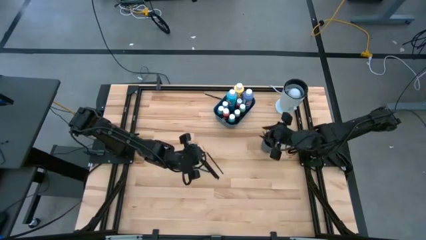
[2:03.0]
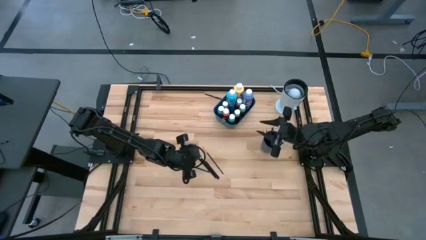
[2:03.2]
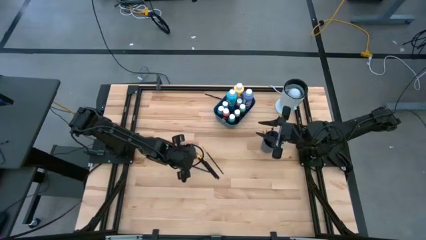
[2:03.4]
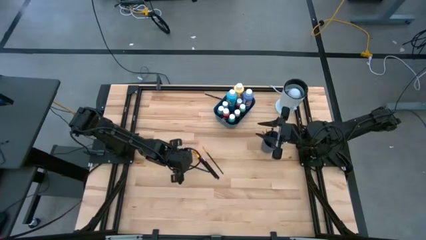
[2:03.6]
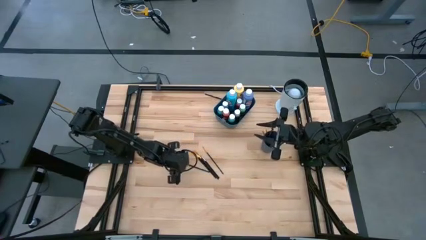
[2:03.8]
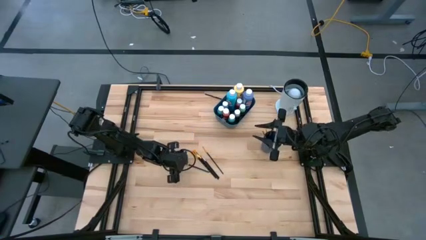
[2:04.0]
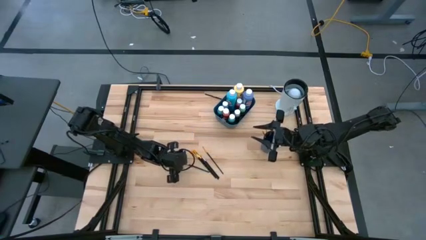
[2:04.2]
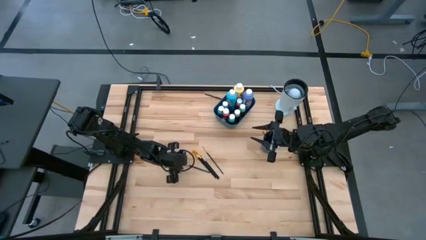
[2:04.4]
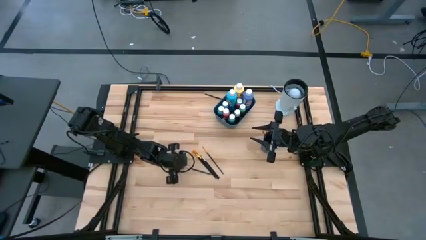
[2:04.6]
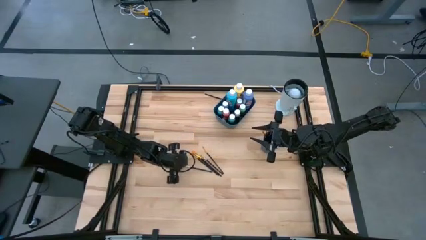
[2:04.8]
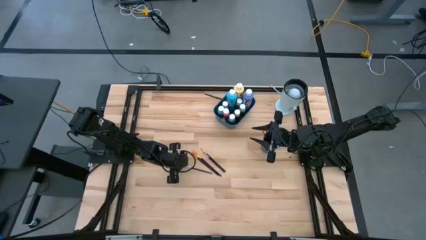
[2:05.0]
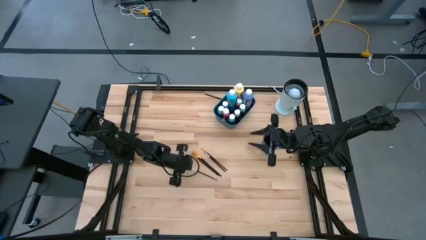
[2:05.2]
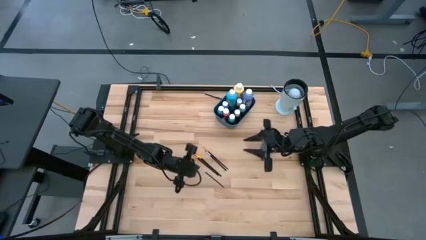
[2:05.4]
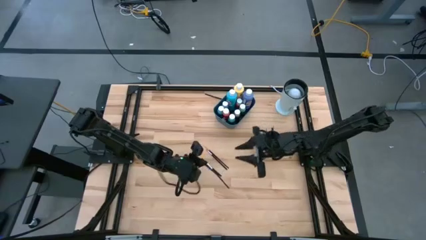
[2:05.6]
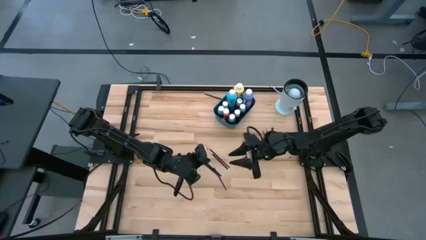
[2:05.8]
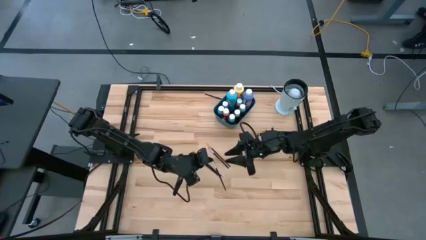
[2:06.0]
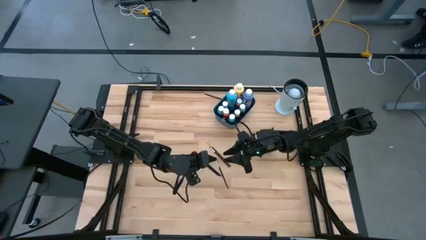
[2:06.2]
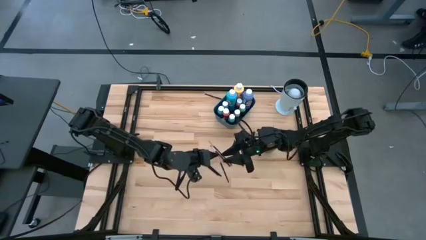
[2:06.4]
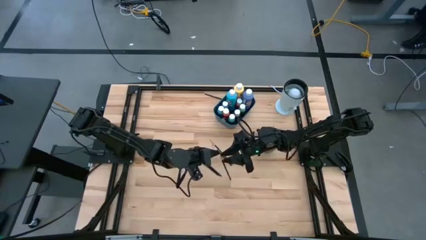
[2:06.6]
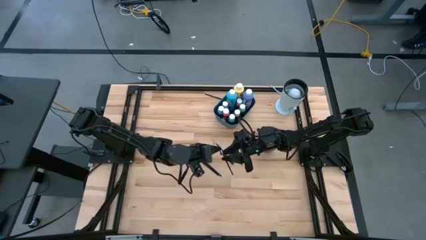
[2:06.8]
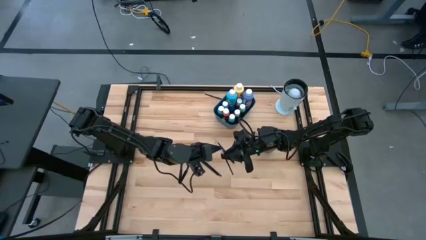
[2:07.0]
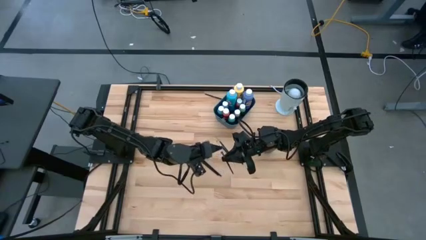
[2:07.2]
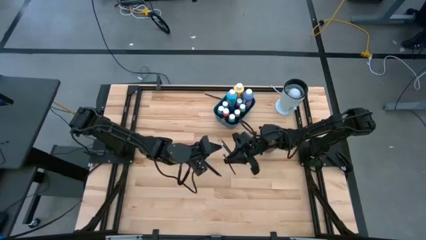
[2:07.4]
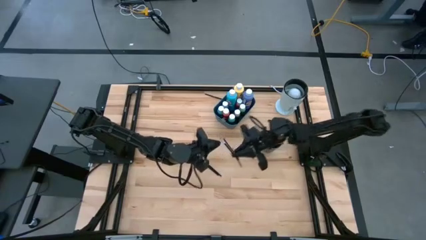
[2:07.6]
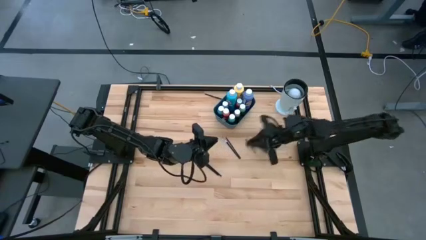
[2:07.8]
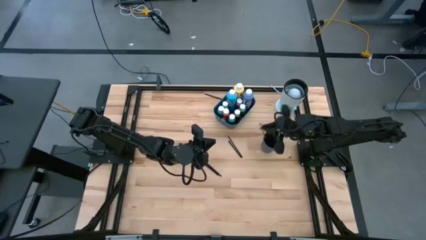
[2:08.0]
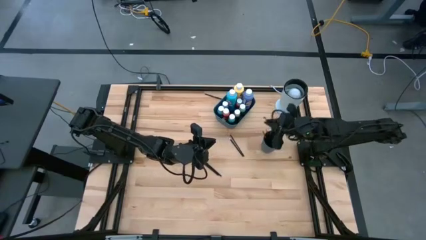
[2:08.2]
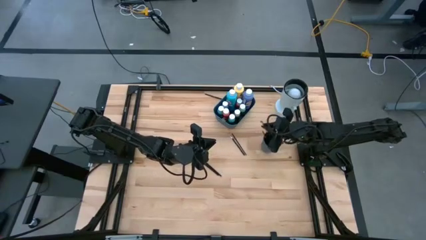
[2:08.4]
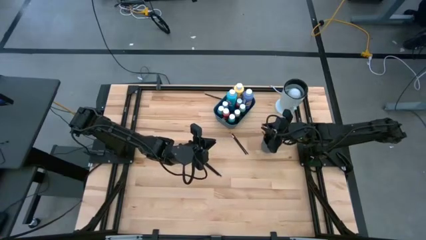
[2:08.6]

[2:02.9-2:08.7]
Task: Pick & Place Paint Supplies
Put the silver paint brush into the blue cup

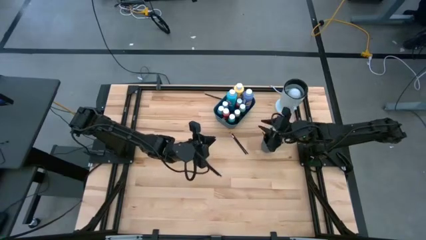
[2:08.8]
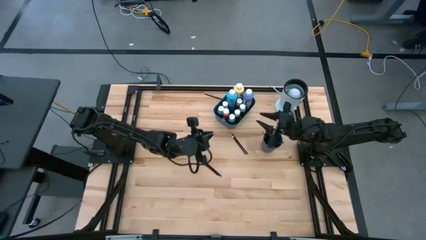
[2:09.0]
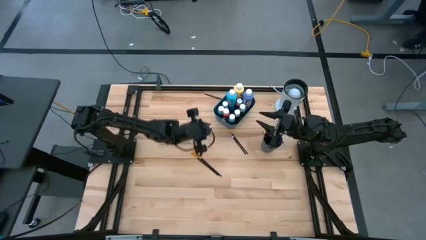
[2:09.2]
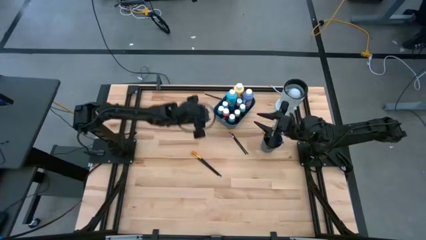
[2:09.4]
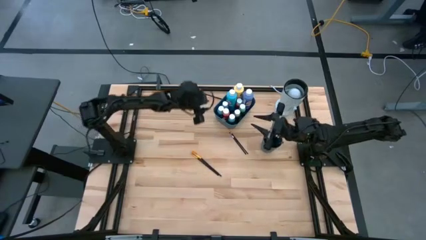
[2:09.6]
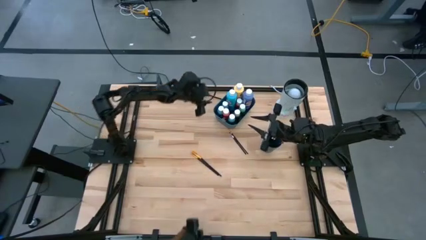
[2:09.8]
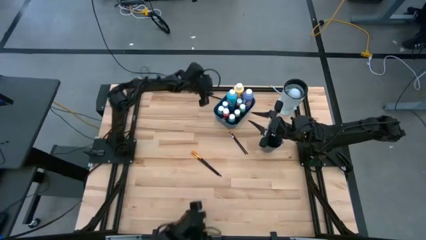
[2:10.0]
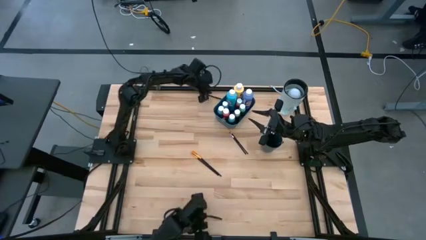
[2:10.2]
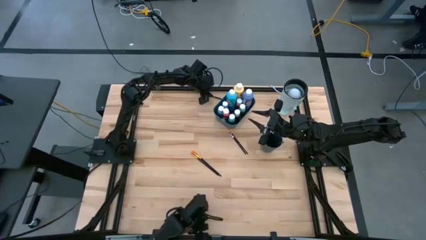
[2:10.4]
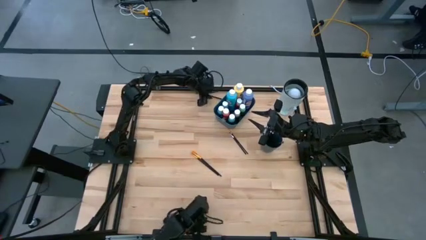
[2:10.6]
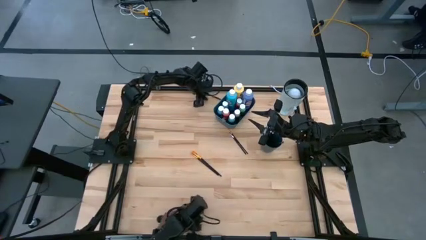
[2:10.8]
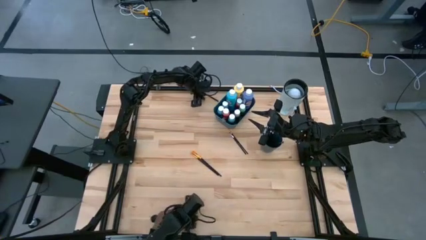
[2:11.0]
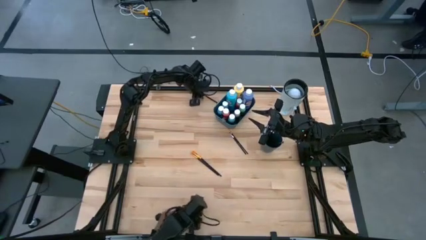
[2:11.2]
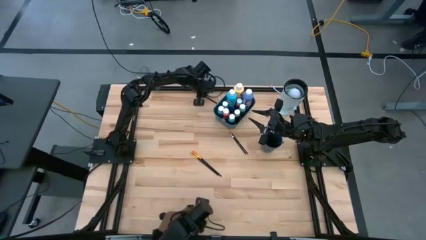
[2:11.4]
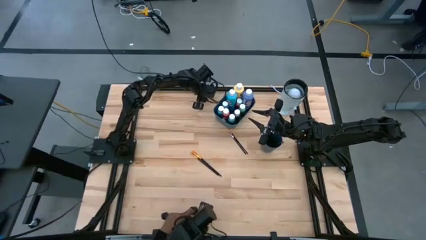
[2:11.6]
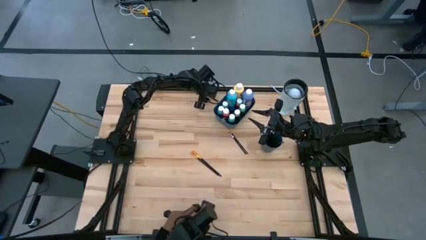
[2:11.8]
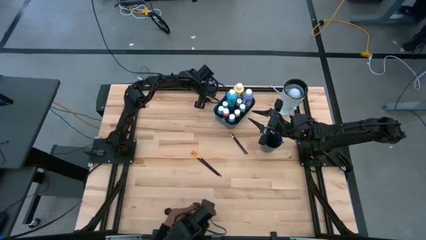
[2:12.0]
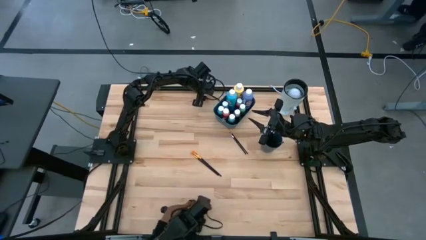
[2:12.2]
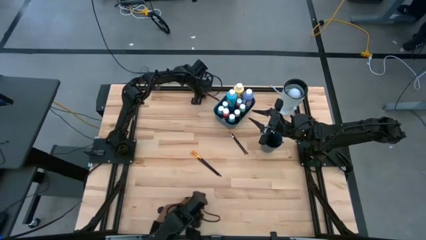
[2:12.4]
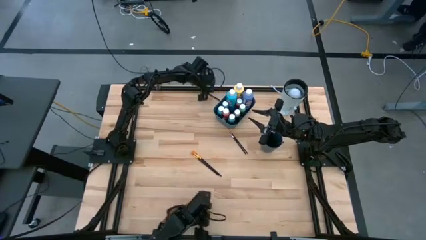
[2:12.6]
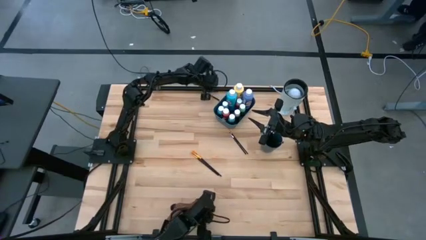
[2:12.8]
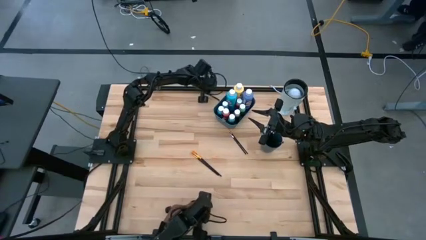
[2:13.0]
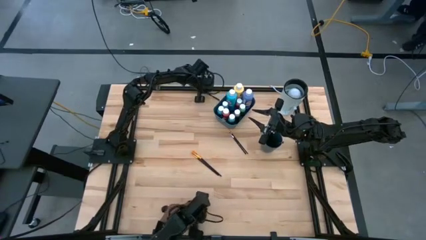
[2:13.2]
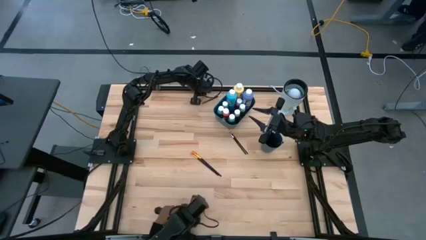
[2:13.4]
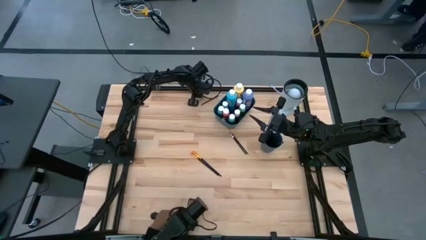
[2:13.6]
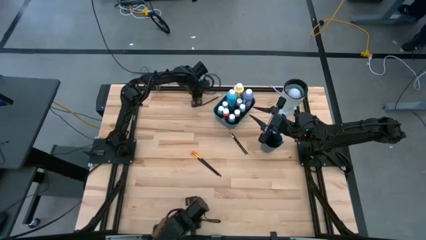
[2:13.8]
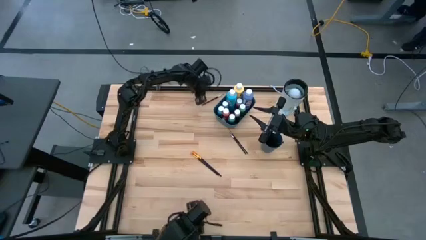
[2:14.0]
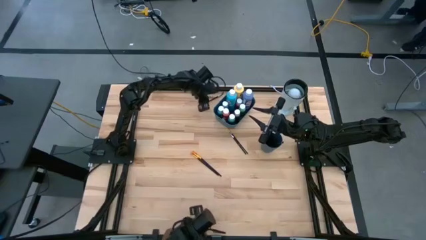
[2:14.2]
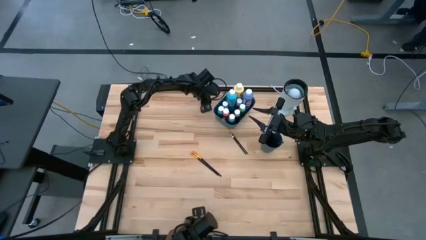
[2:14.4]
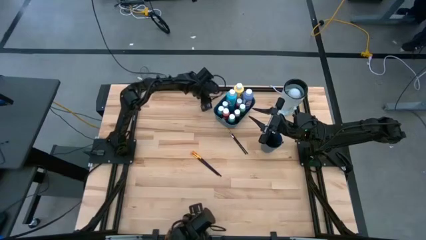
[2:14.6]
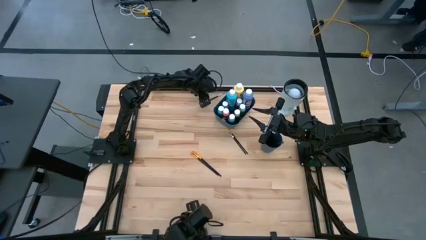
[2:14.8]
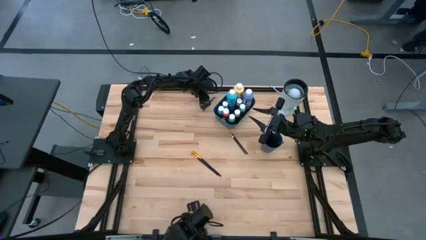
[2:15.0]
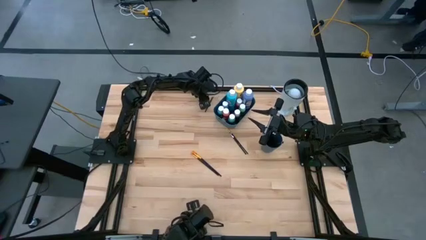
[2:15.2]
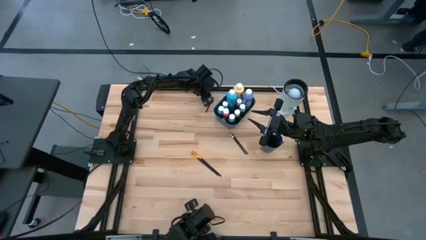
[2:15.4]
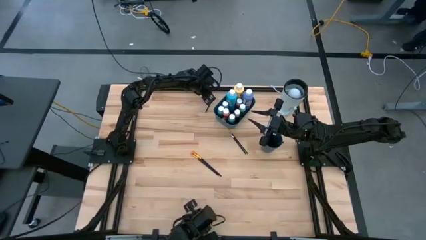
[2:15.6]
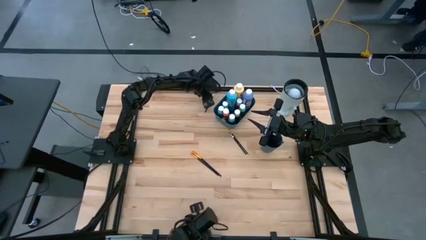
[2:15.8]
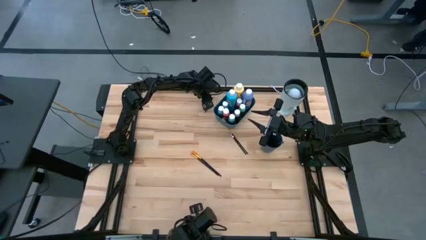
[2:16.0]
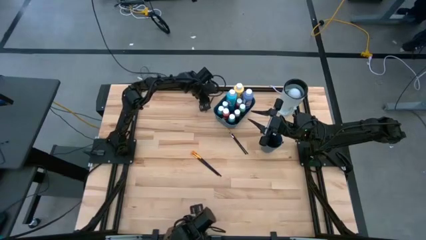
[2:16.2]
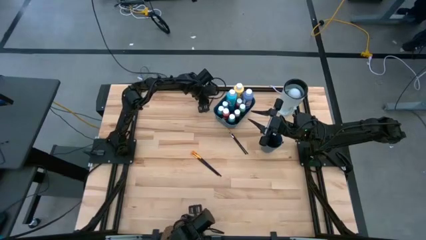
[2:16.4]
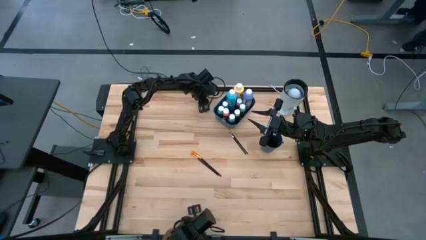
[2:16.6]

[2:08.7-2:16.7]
Put the silver paint brush into the blue cup

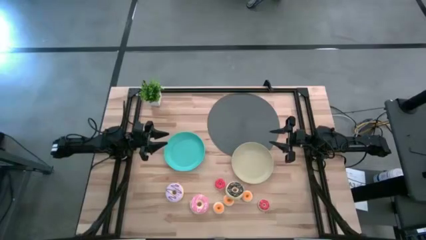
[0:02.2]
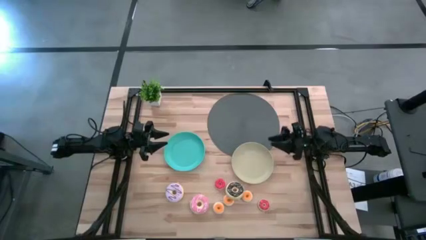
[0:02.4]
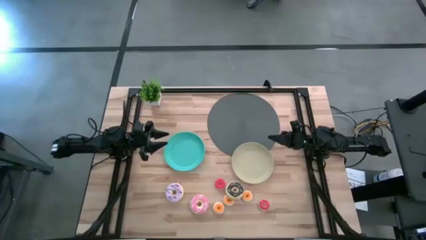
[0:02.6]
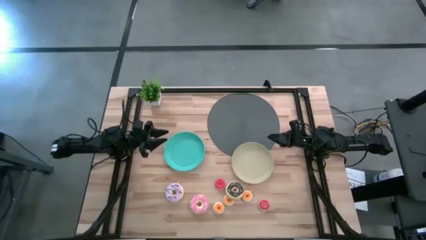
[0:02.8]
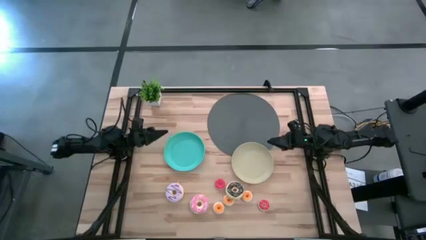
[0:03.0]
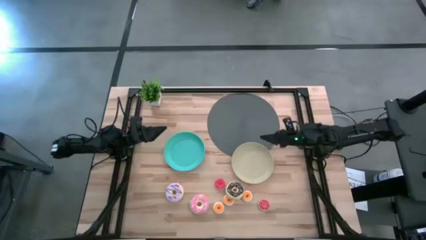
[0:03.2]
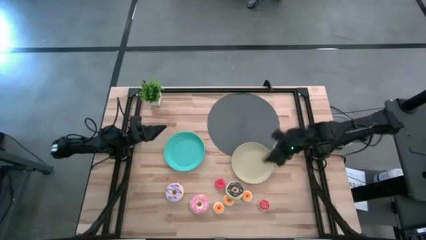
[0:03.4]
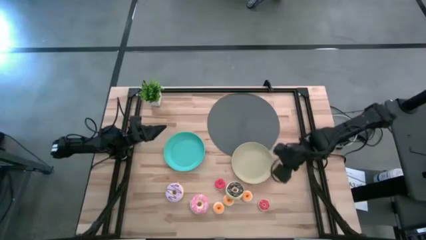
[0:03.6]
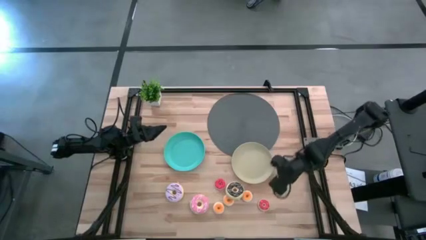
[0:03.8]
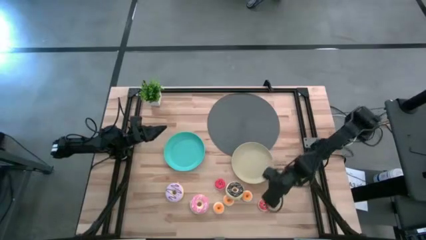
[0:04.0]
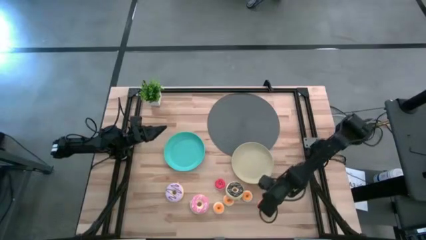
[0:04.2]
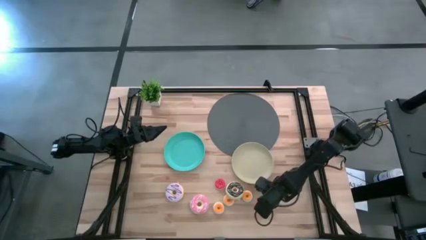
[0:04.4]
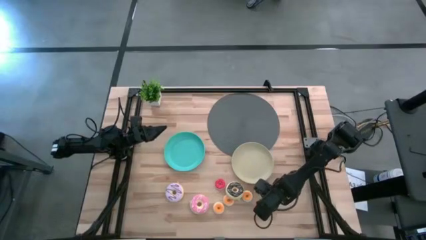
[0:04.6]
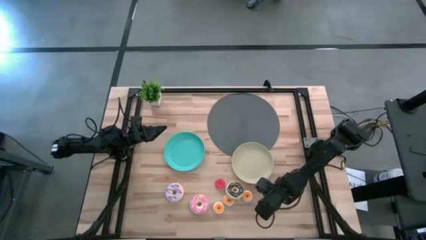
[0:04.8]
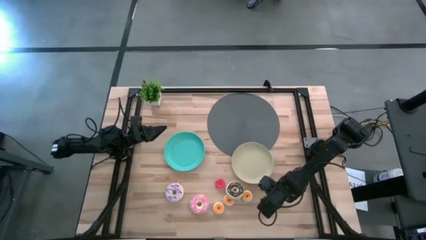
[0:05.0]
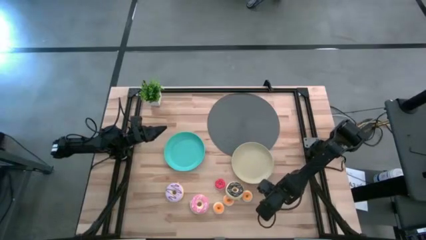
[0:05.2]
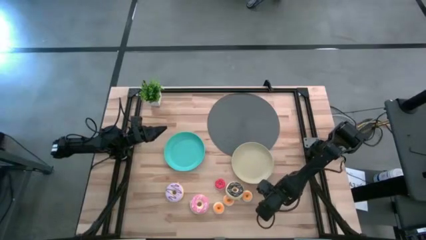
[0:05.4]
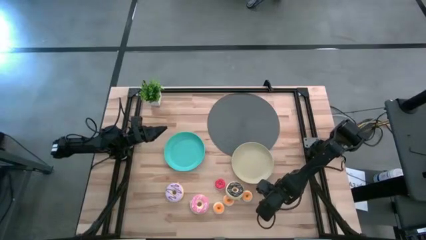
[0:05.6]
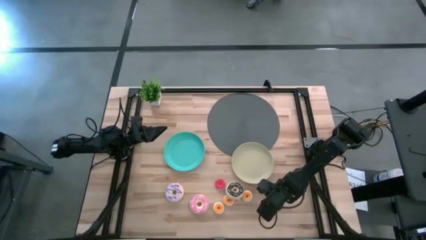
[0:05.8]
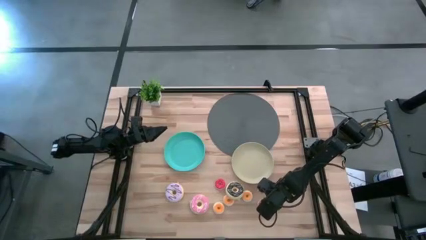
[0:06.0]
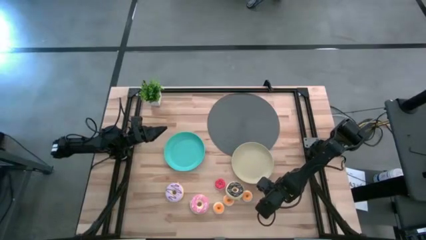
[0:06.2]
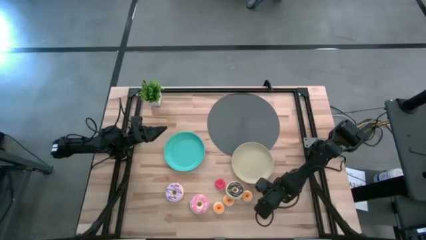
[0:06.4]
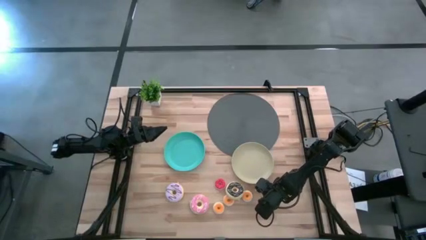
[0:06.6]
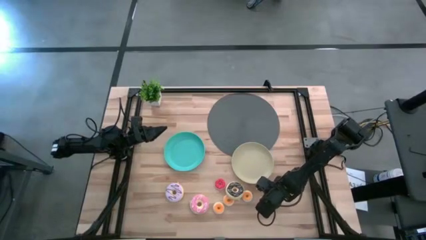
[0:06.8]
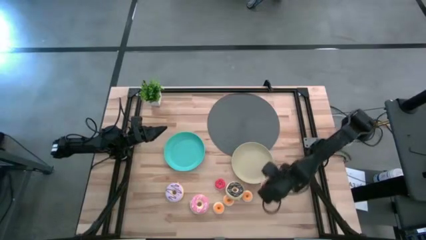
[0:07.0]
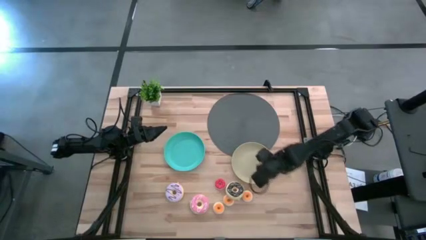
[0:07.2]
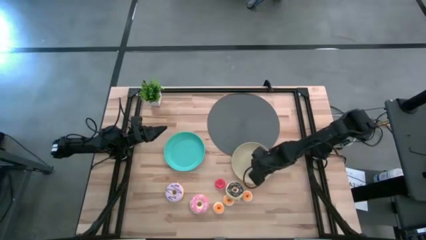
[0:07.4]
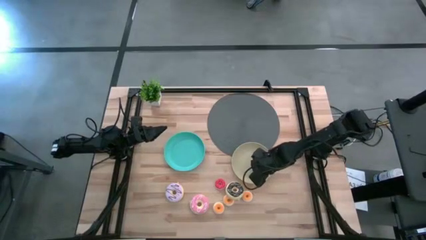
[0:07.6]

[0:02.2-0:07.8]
Task: Pick & Place donuts
Put the bottom small red doughnut on the brown plate
